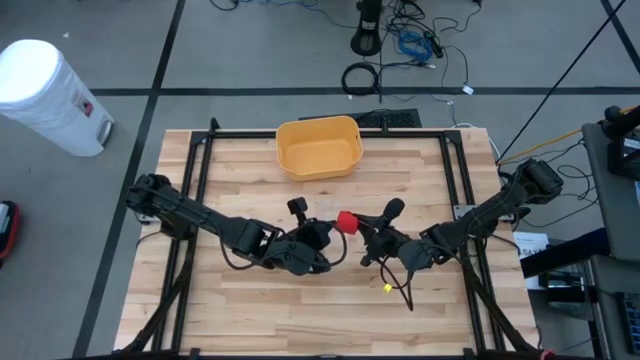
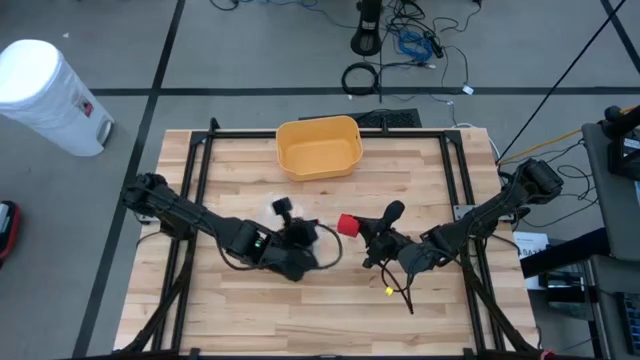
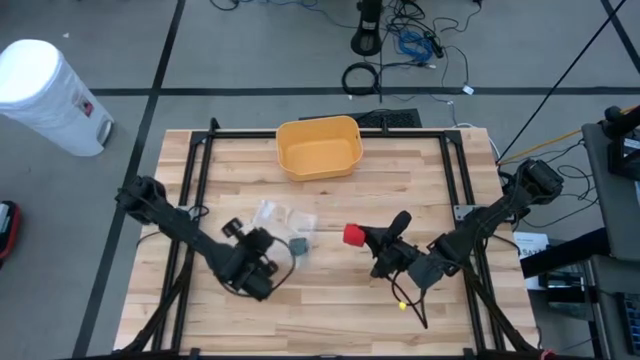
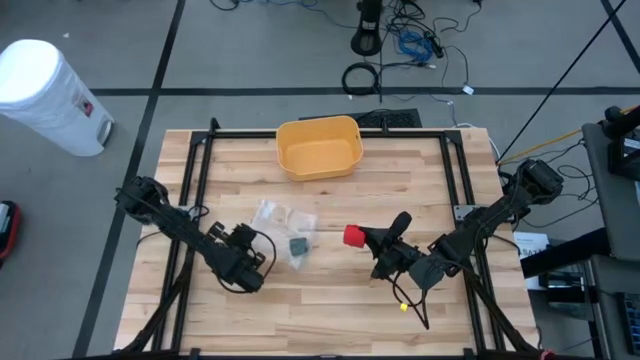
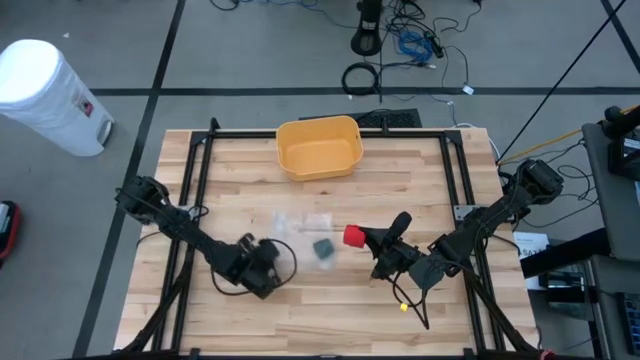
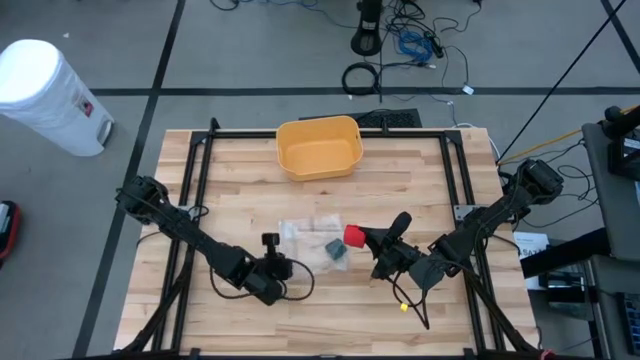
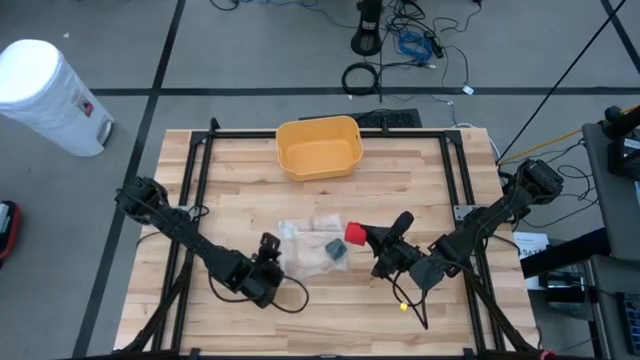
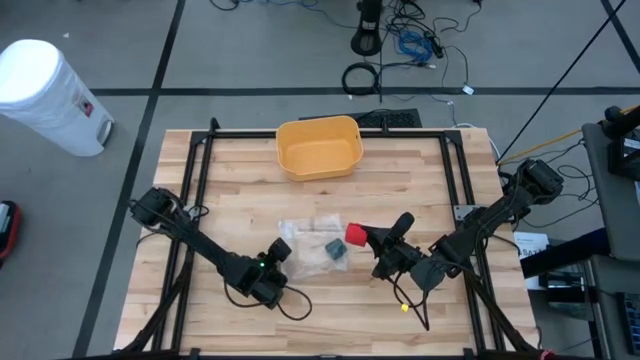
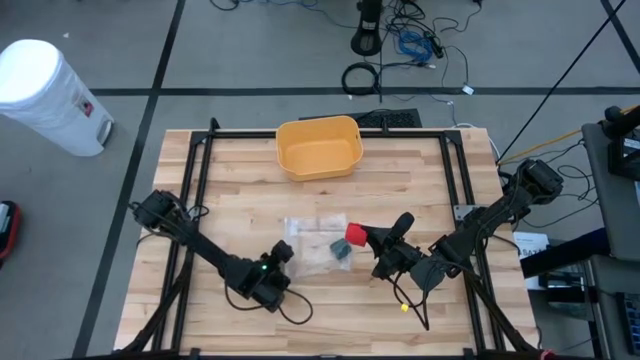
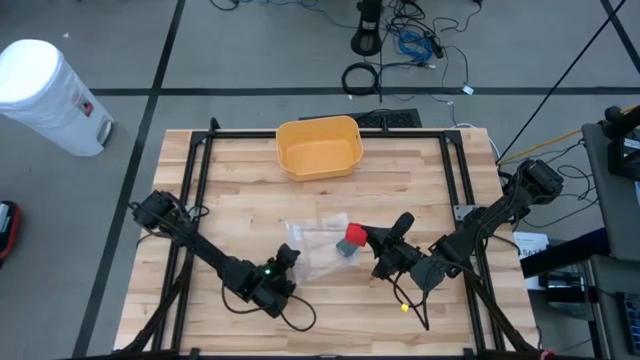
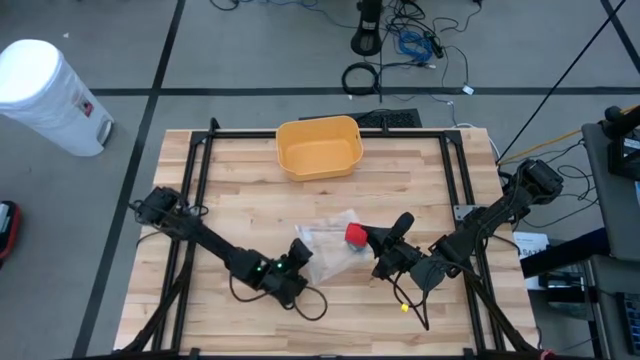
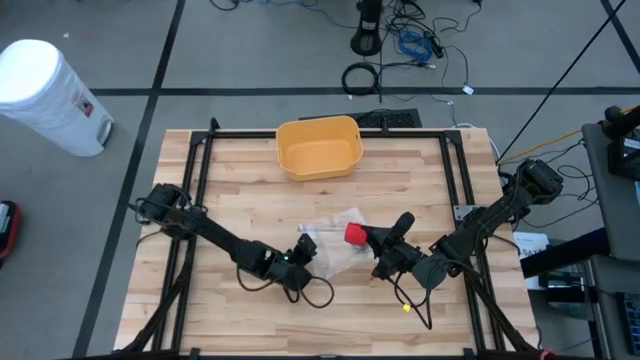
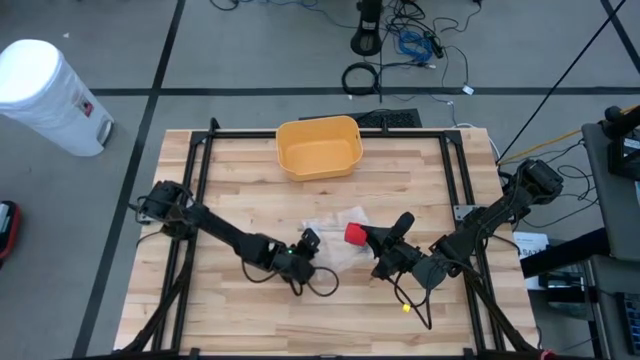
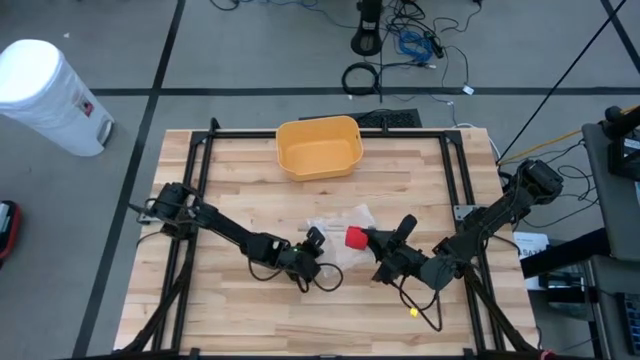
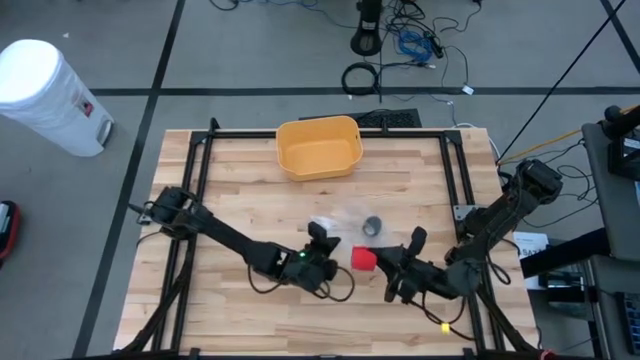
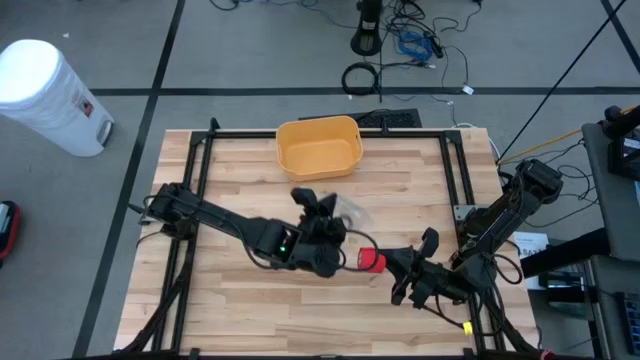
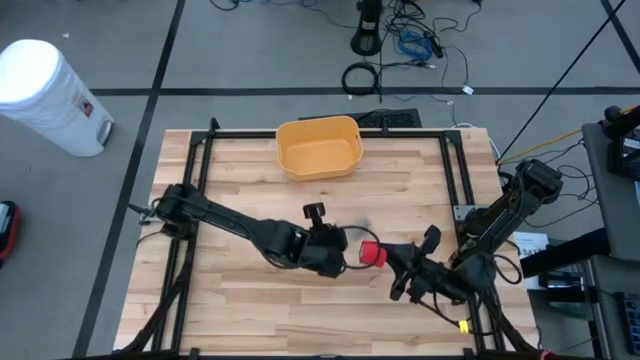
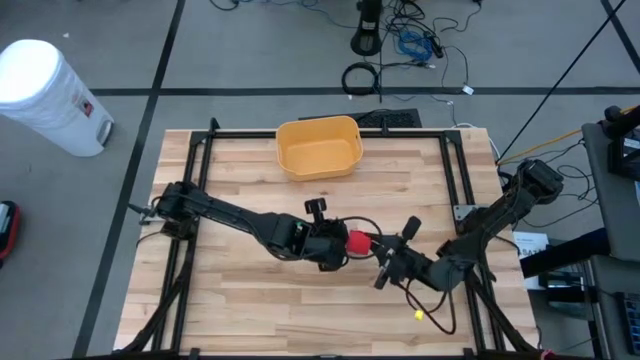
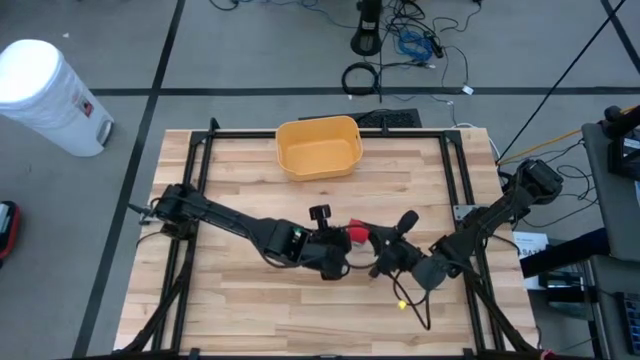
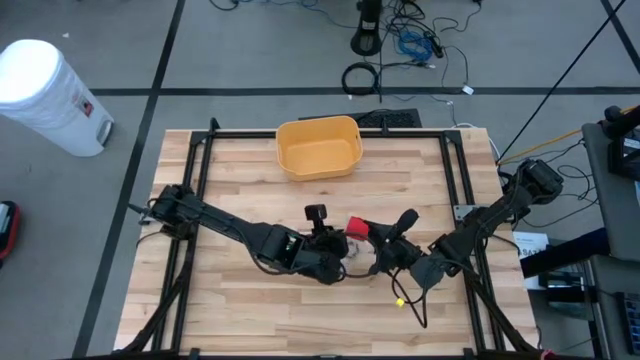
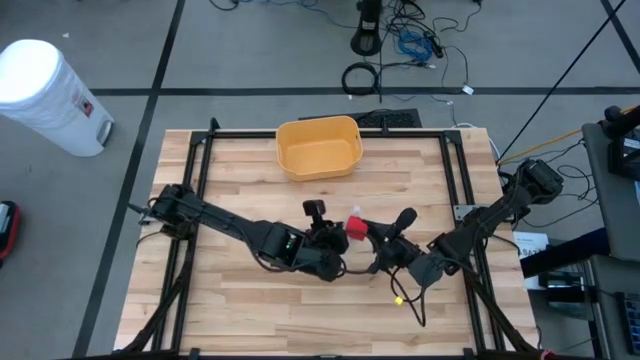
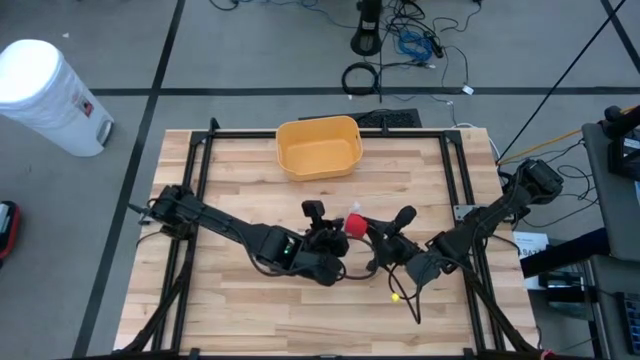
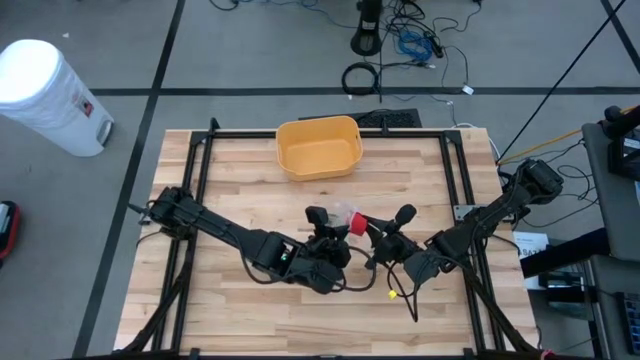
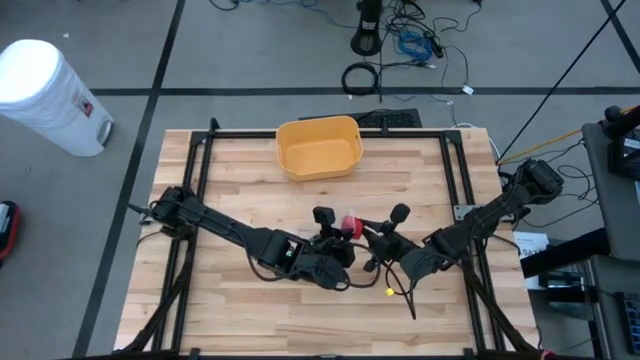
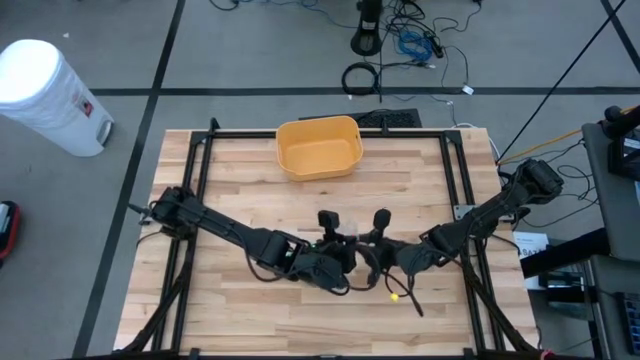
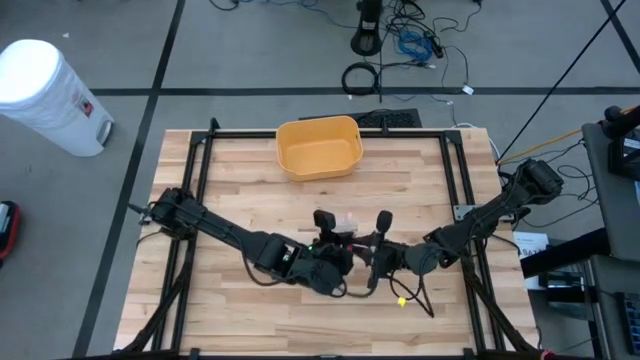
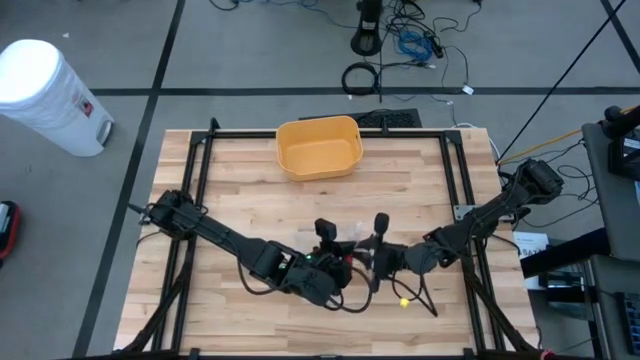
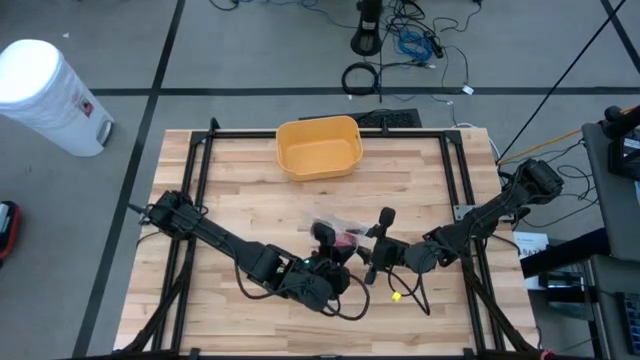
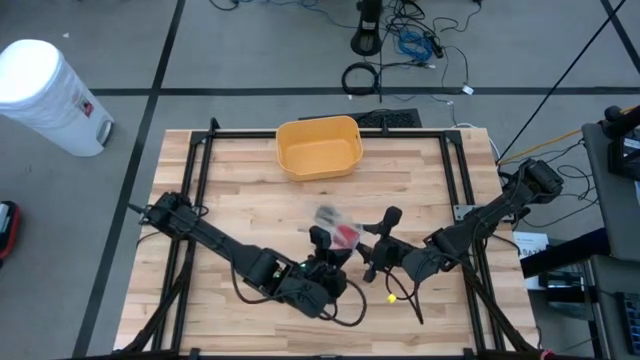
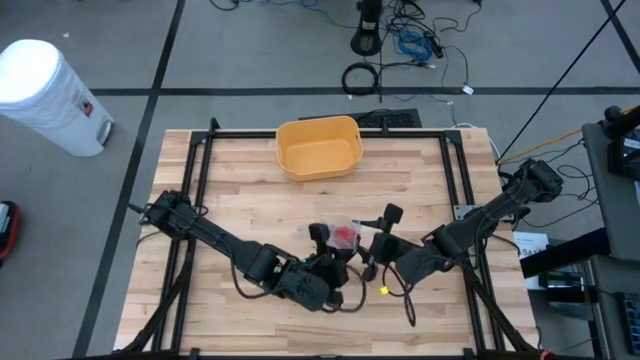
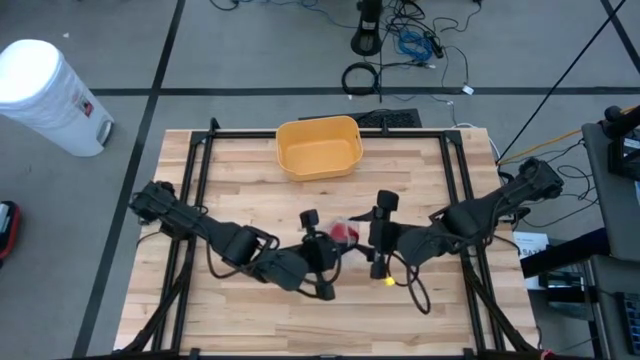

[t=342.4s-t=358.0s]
Task: Roll bandage
Put the rolled red bandage into the transparent zip bag

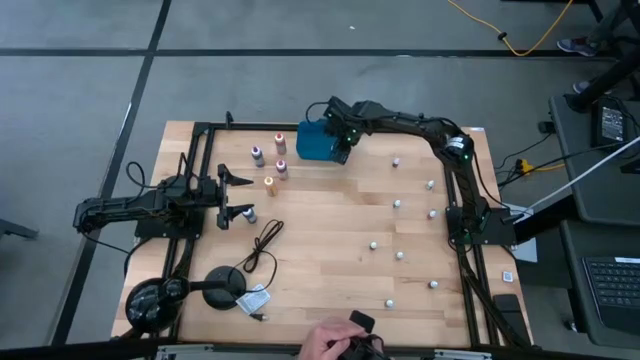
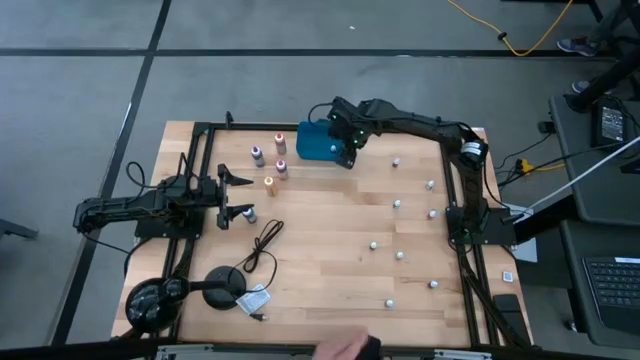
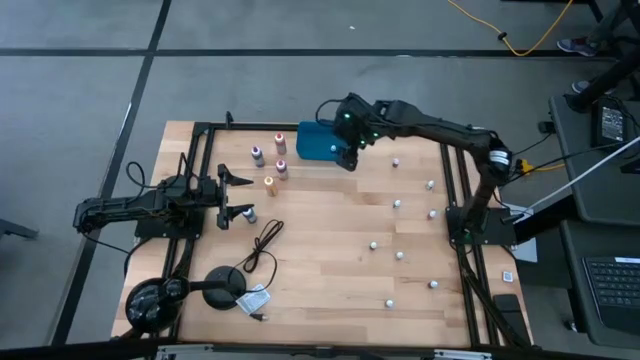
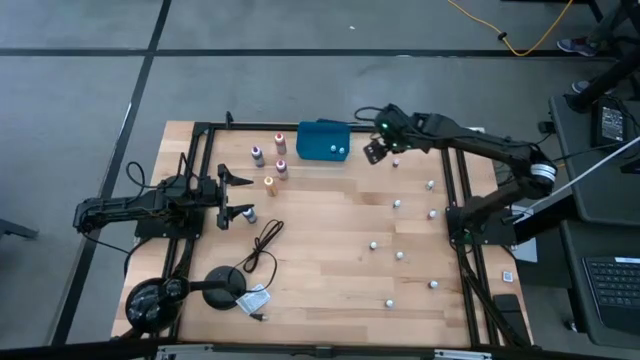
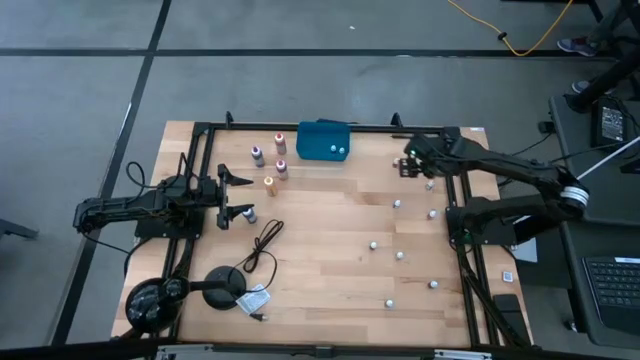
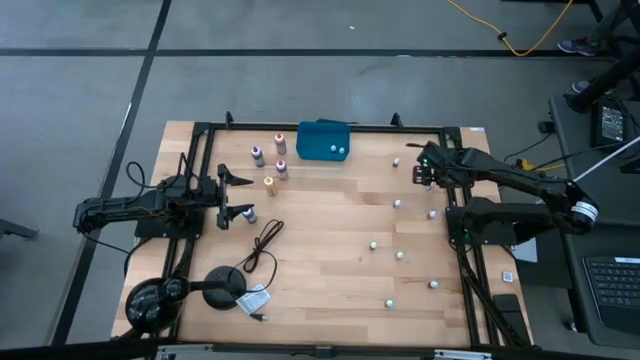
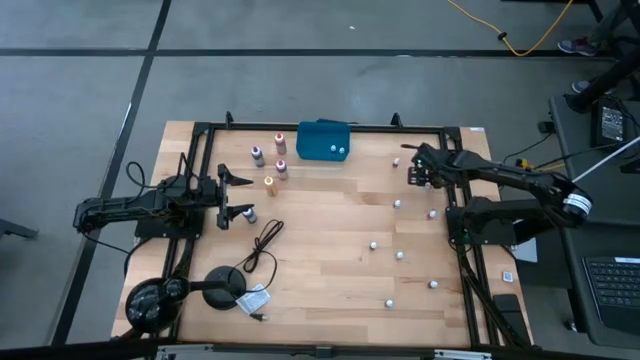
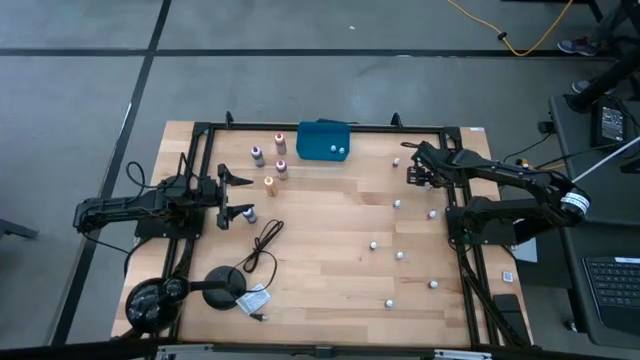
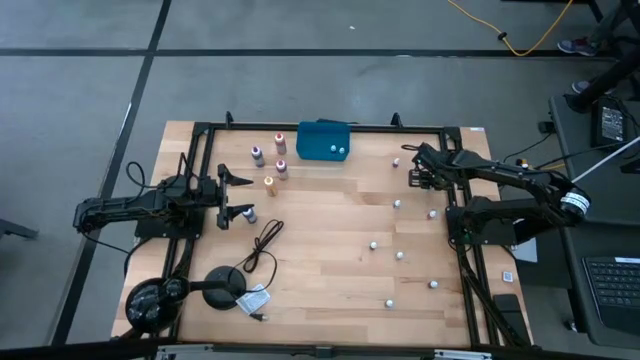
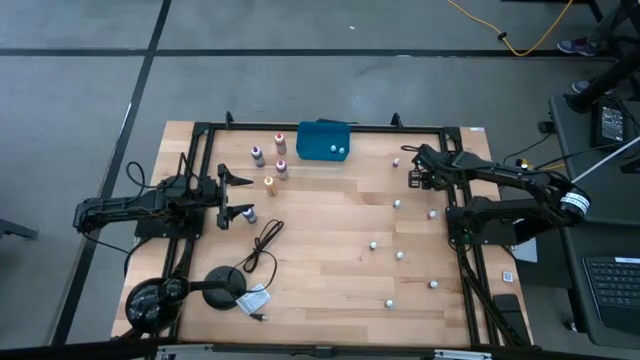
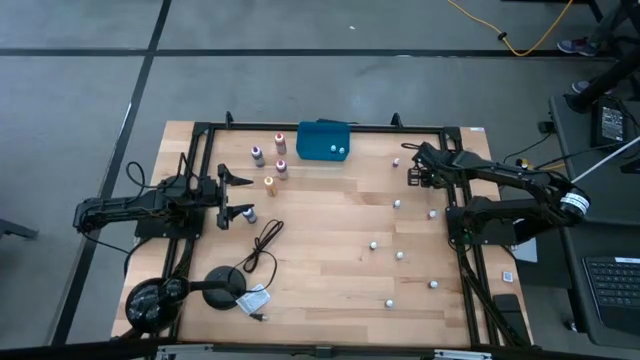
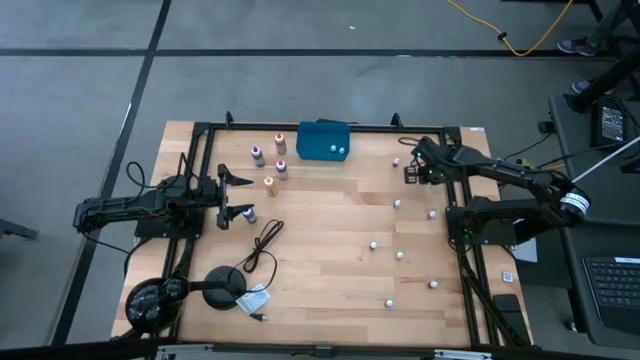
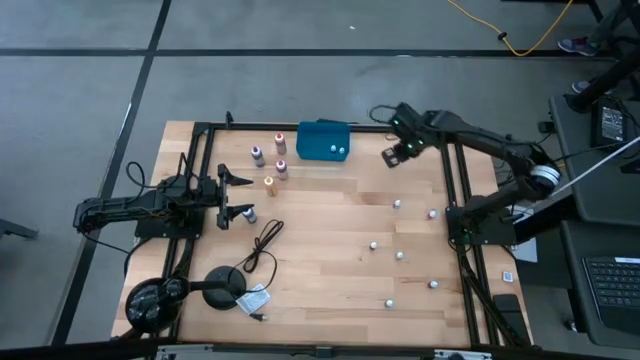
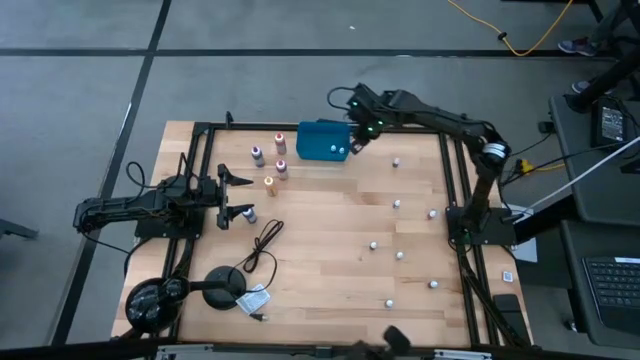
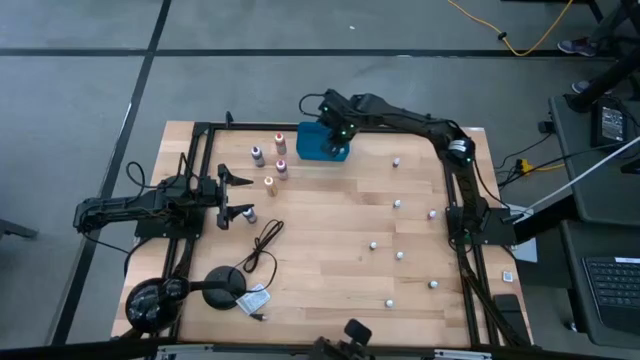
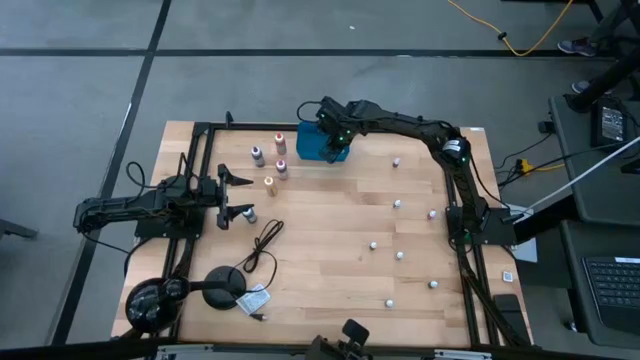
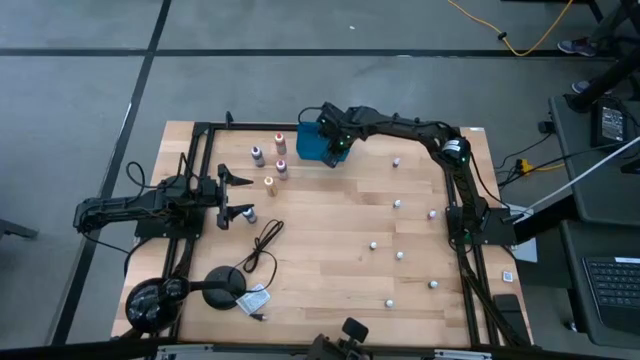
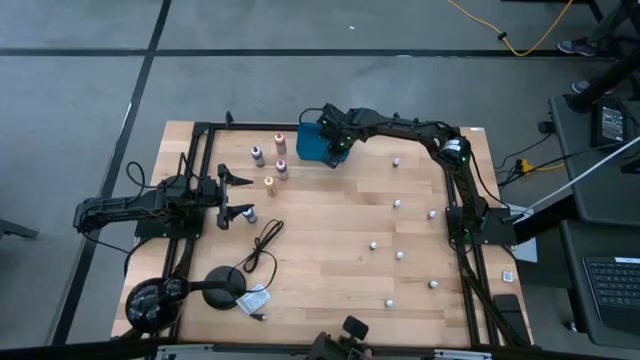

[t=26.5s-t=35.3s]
Task: Pick & Place food coloring
Put the small purple food coloring bottle into the blue container
